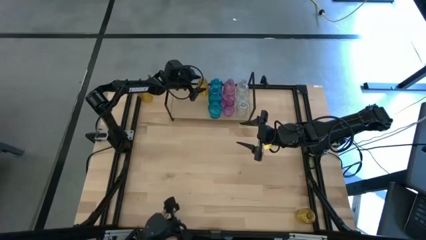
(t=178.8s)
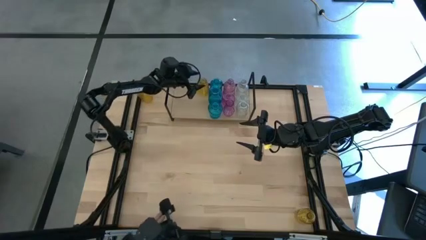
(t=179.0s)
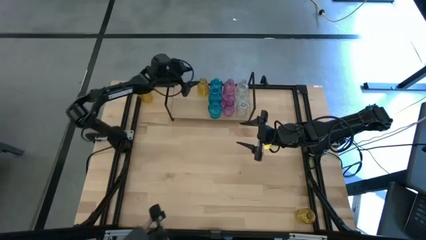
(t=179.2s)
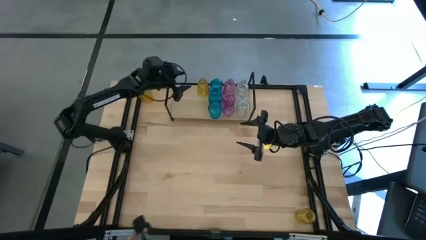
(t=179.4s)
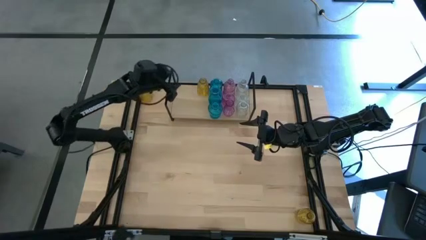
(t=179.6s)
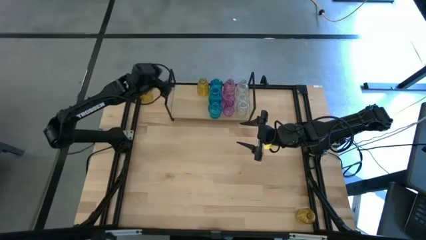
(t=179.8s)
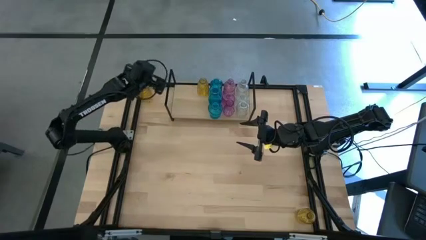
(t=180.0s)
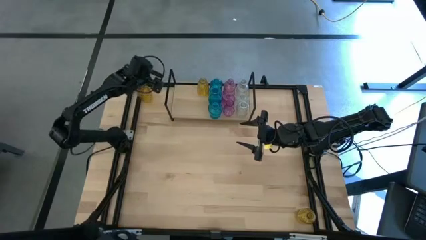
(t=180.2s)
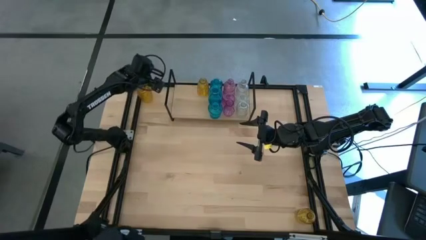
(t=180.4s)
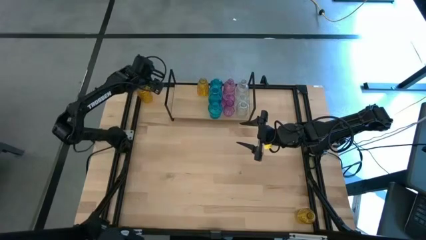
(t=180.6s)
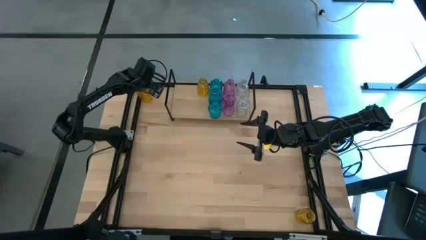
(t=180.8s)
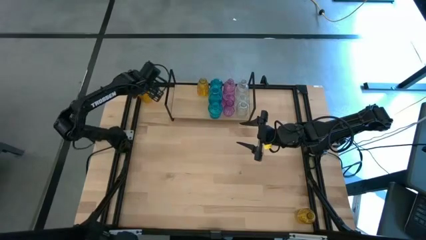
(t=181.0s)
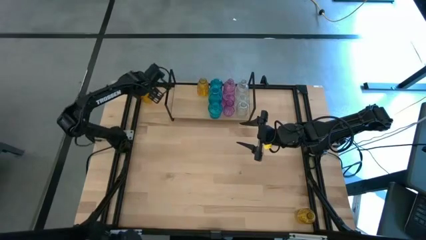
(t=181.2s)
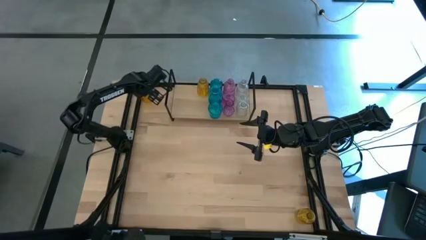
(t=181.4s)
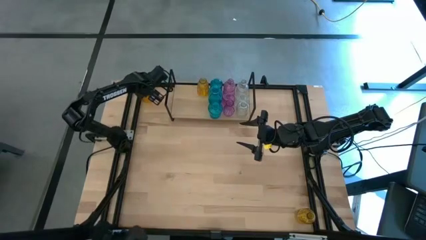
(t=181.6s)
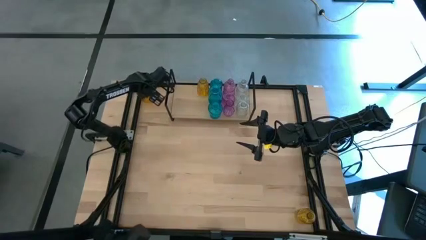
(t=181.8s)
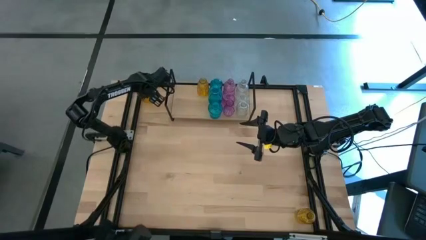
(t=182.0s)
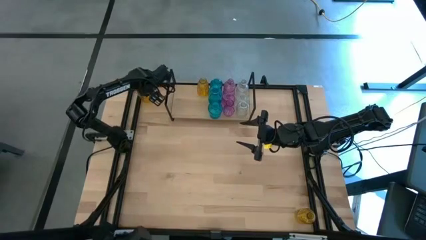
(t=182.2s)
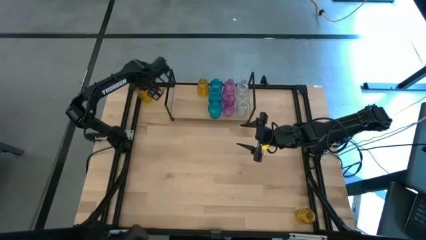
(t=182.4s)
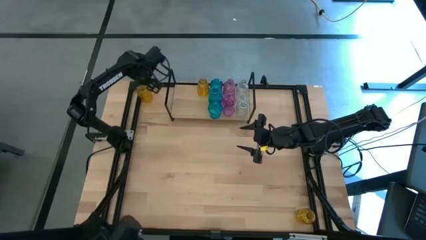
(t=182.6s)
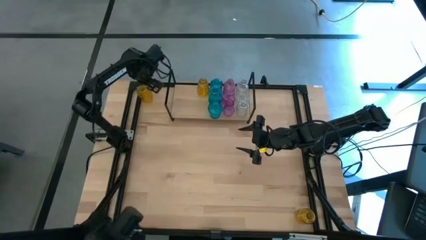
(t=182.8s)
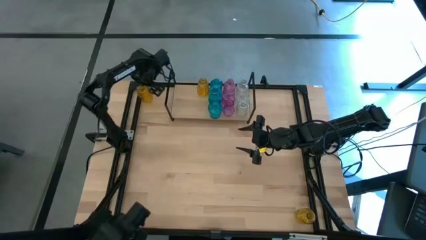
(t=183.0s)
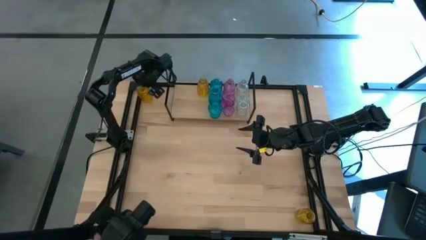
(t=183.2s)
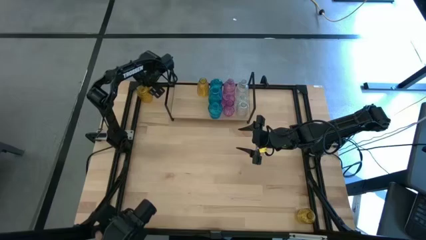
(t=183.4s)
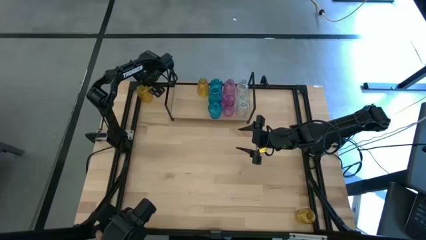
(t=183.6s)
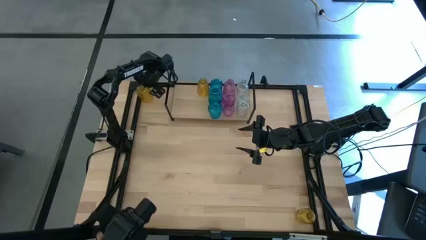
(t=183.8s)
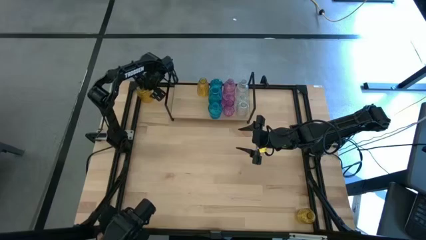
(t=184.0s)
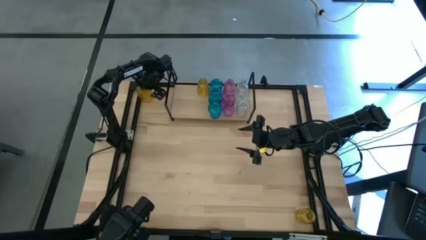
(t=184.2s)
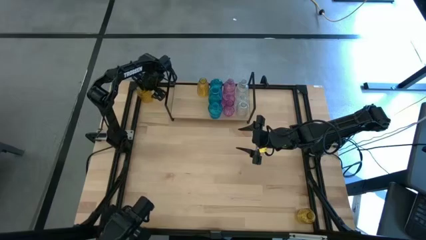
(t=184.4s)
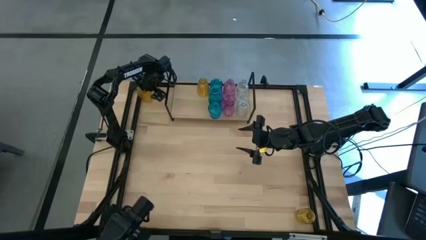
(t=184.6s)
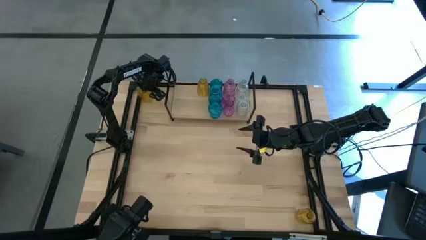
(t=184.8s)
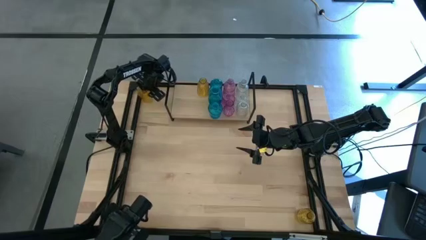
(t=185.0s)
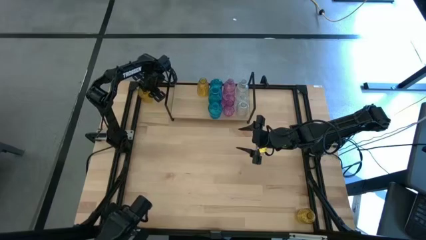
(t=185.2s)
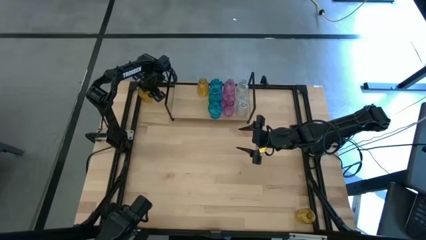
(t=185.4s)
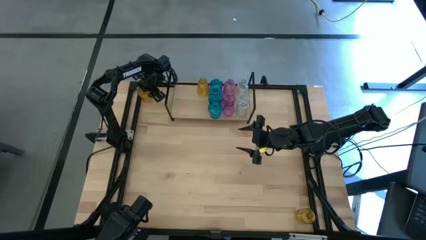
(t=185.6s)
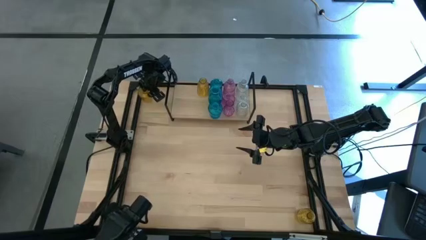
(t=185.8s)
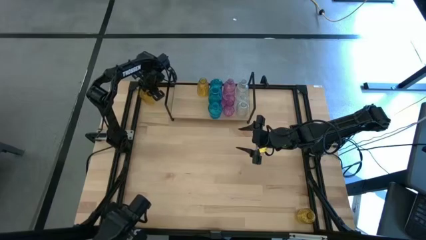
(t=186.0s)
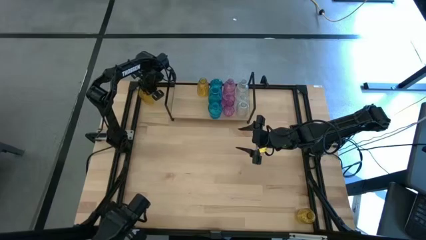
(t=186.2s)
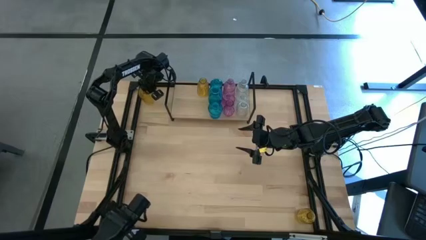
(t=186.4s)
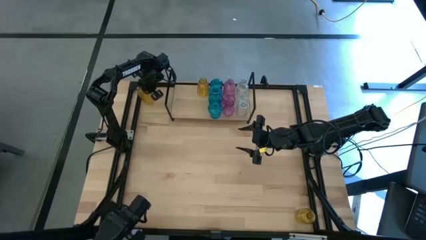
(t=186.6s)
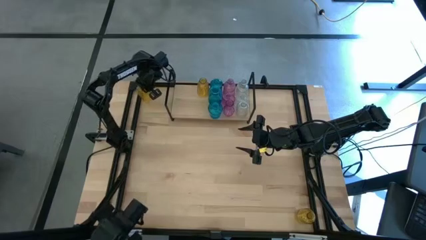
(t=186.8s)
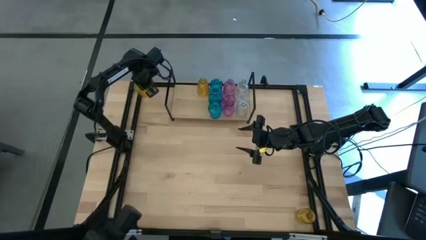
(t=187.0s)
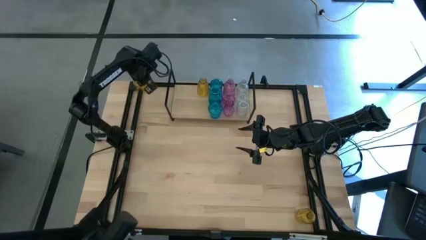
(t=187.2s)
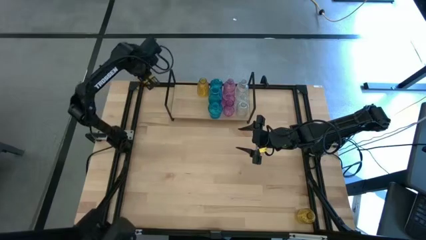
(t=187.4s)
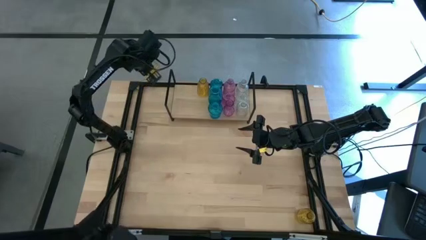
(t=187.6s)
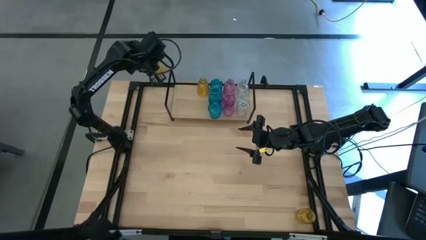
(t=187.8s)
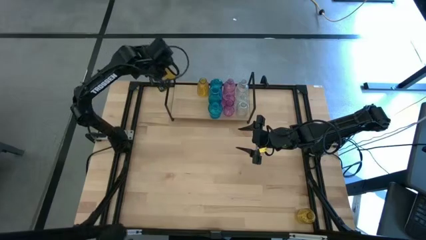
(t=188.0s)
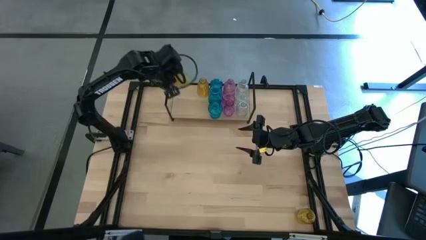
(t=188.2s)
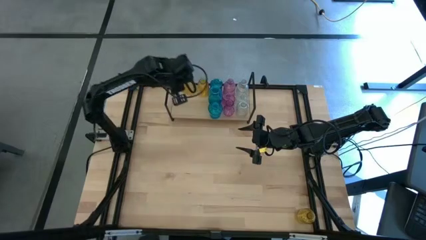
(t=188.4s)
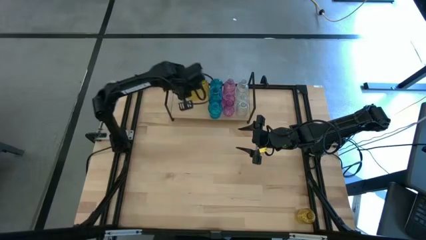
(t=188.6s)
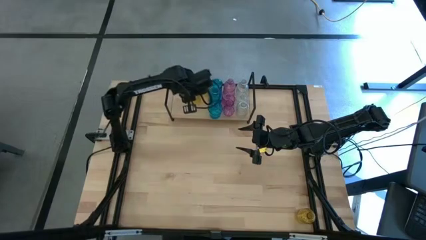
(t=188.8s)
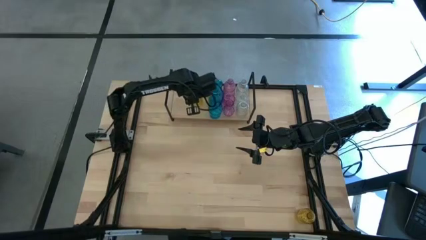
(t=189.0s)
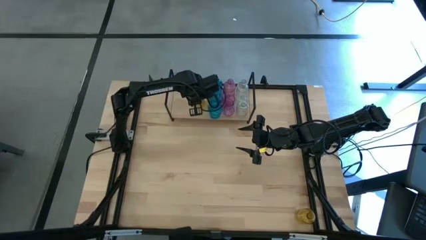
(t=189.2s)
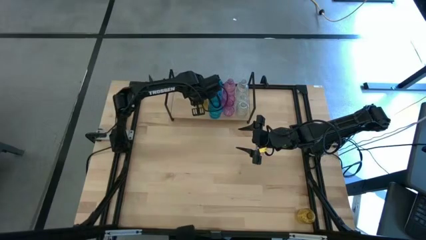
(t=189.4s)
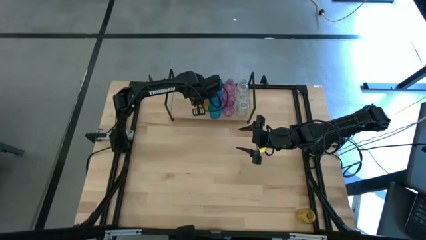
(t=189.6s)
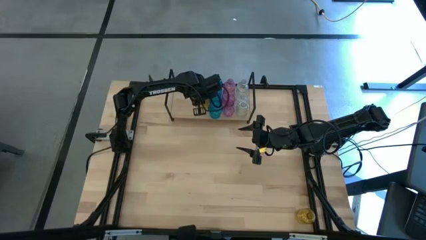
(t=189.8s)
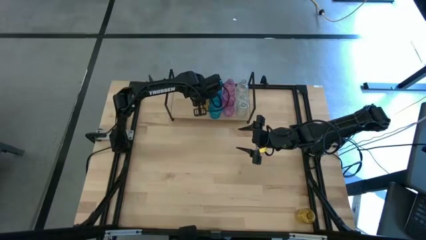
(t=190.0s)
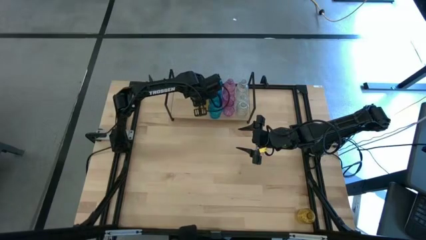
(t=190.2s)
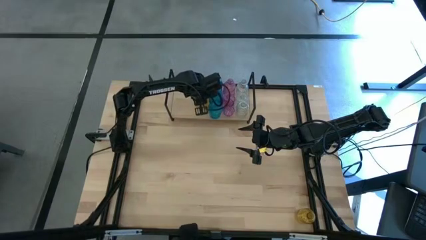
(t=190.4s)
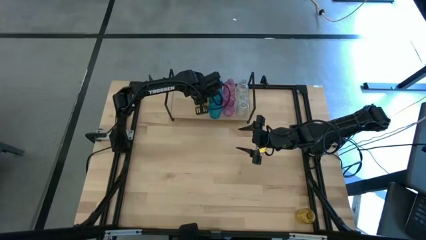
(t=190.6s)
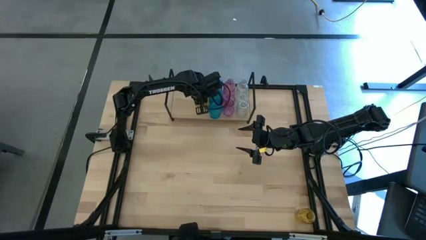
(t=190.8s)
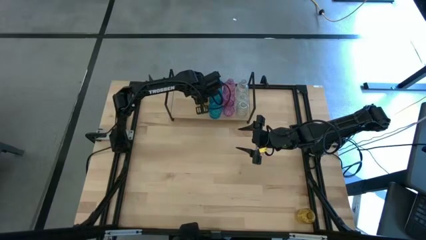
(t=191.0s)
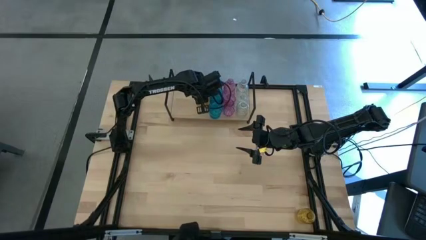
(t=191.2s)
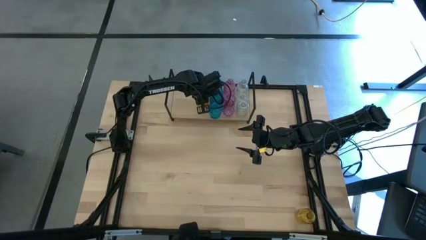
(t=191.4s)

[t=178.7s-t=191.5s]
Task: sort vases onto shelf
Put the top yellow vase on the shelf aligned with the other yellow vase
